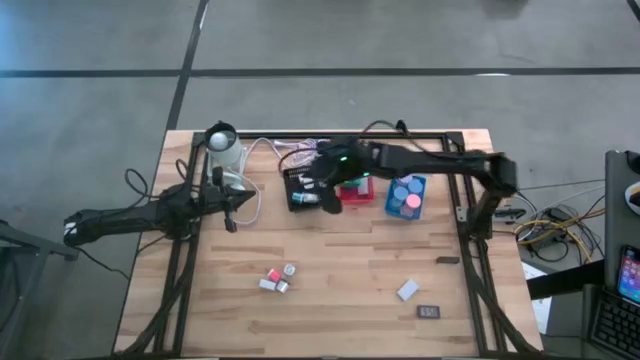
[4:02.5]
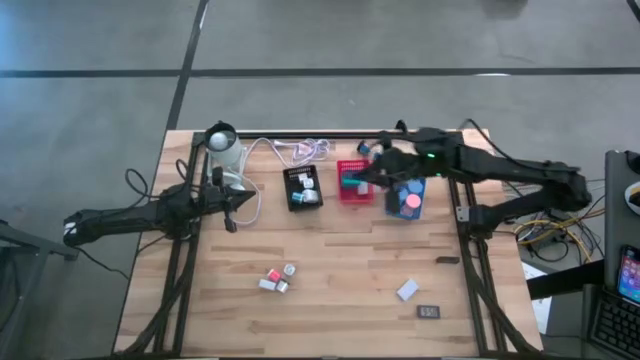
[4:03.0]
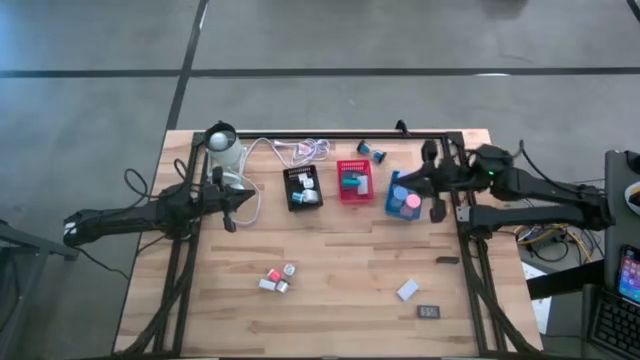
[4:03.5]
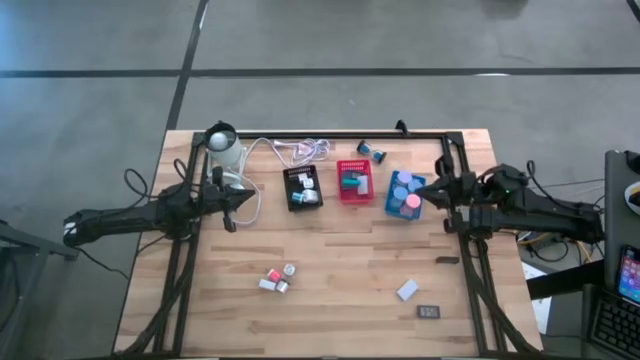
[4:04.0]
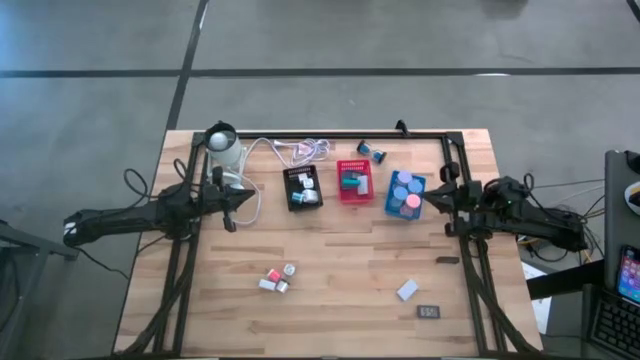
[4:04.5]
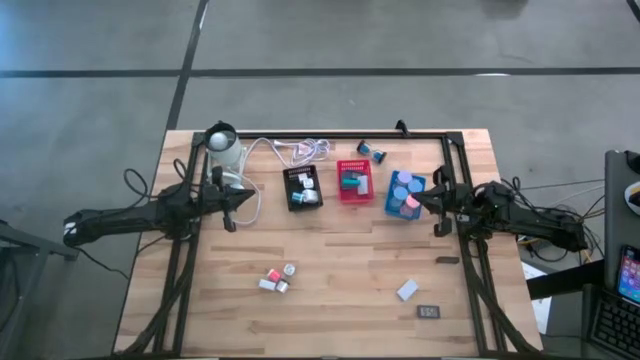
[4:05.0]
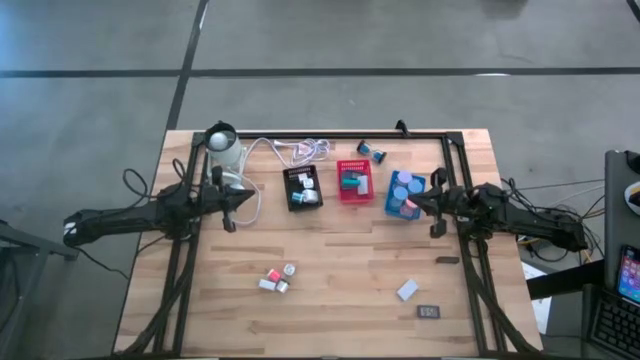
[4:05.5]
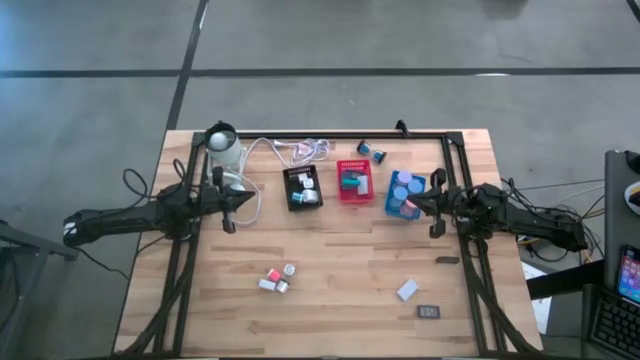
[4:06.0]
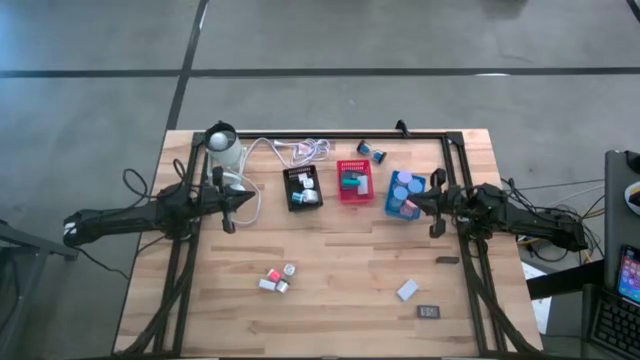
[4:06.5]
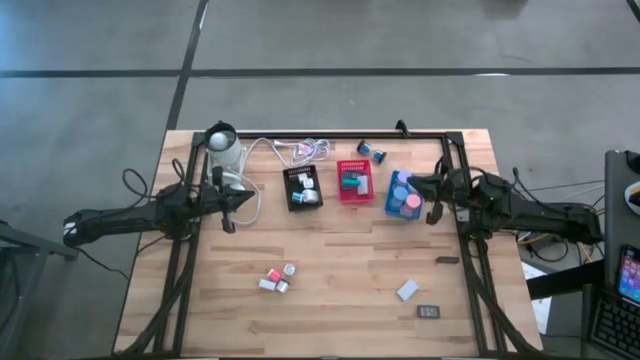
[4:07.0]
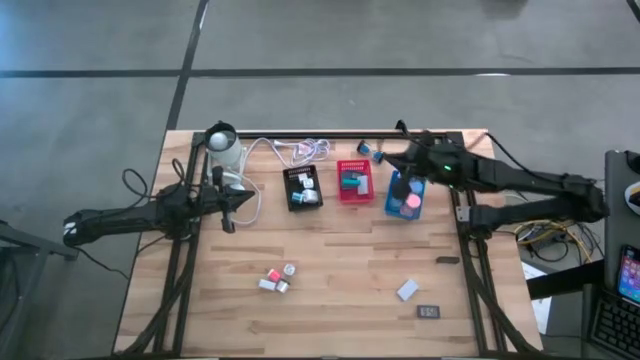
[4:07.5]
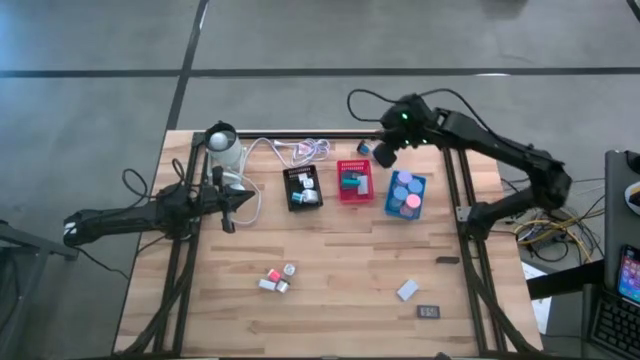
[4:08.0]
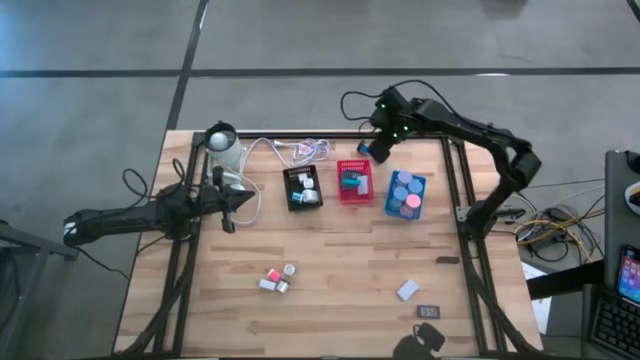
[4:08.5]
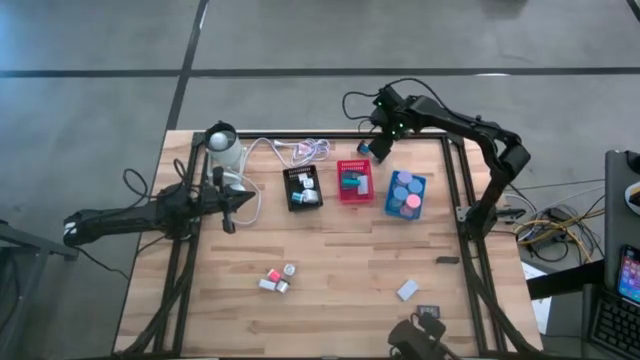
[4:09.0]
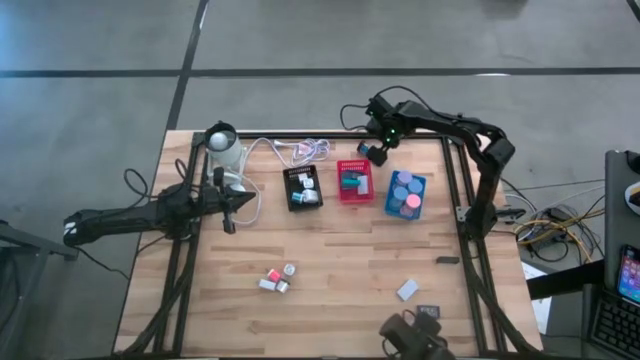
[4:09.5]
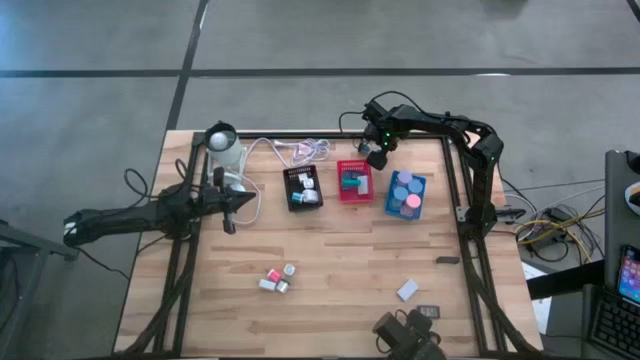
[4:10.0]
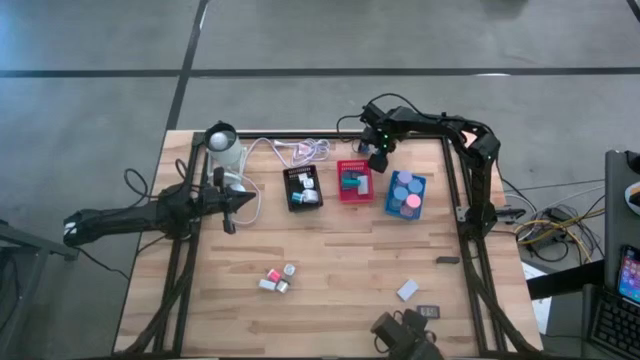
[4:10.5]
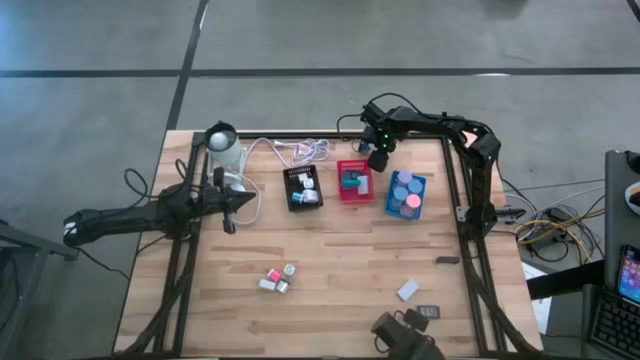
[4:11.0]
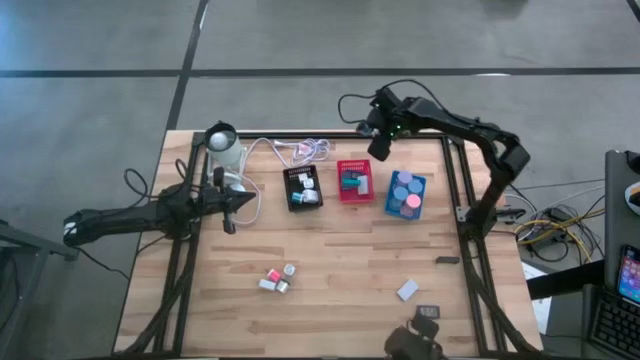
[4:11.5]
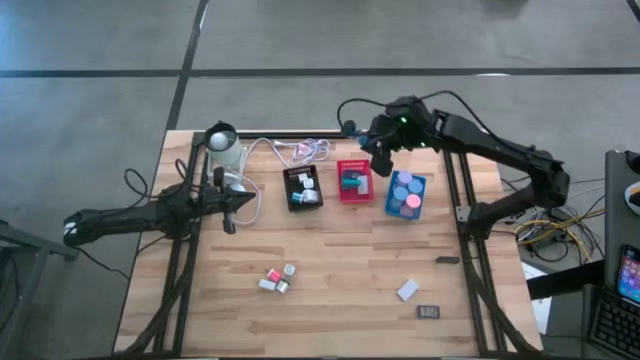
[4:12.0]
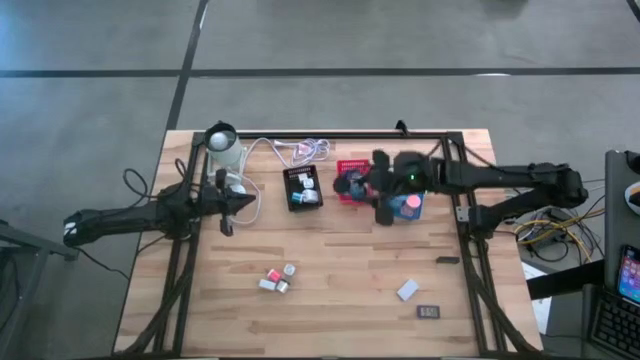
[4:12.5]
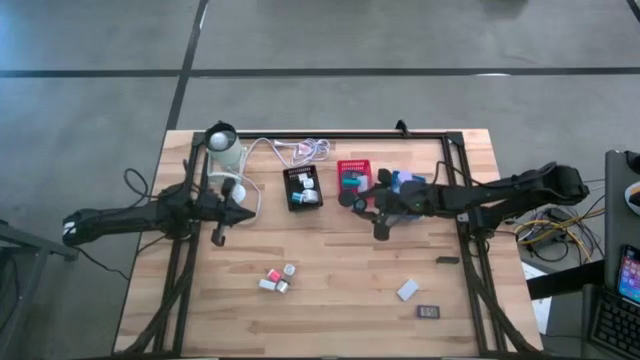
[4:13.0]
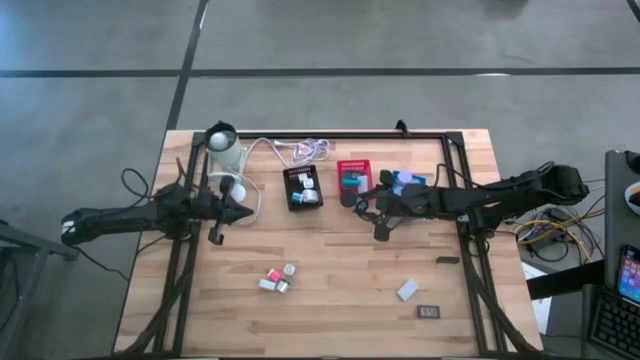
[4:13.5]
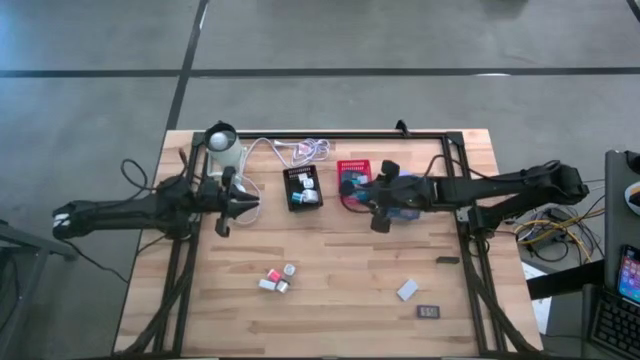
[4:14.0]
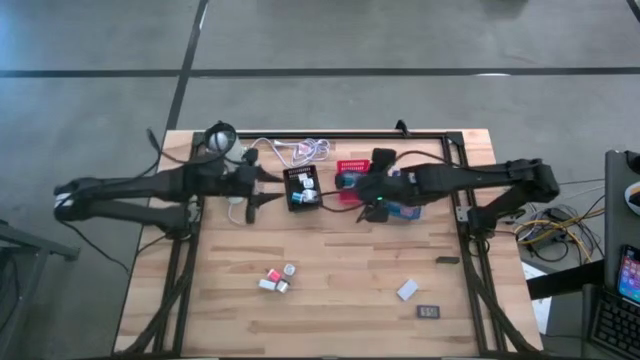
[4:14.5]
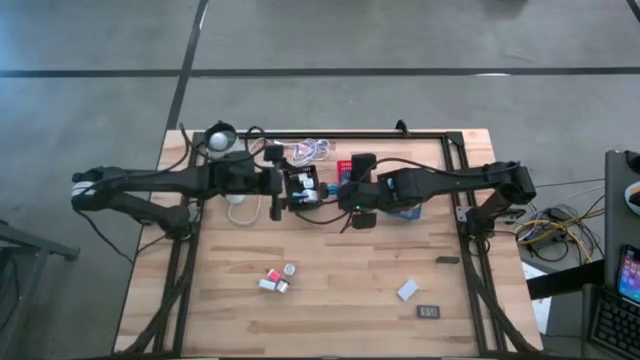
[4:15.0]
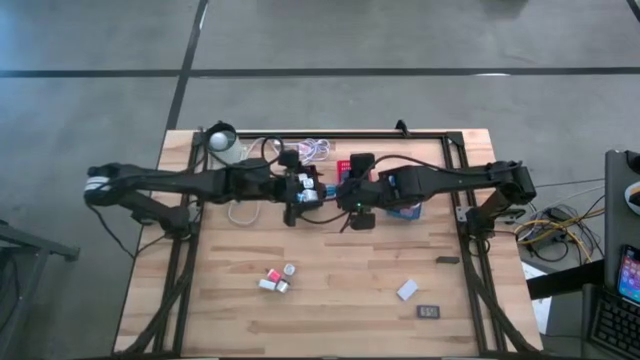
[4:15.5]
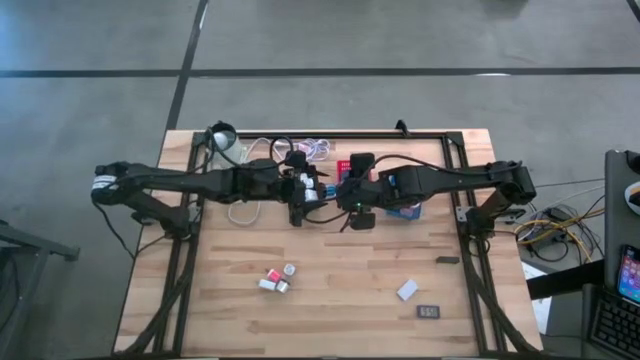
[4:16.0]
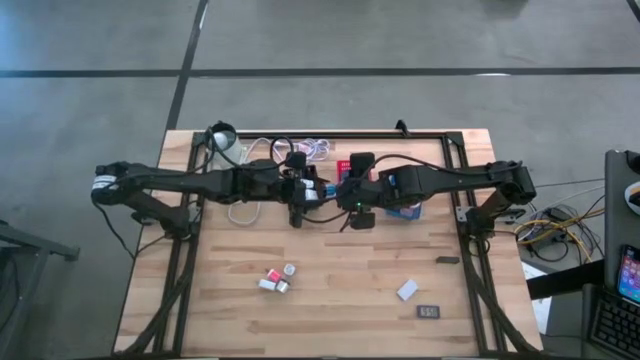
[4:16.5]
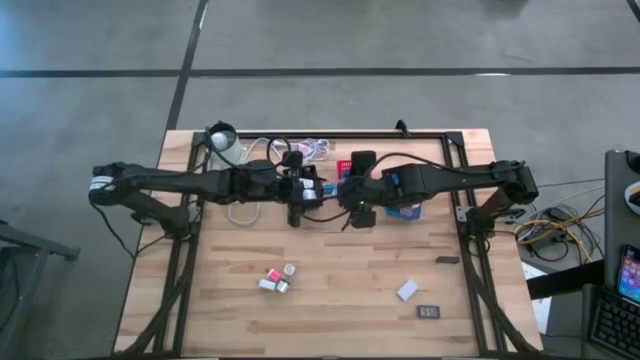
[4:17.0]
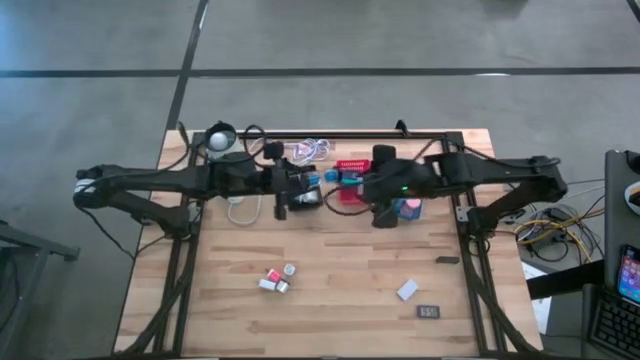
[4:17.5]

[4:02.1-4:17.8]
Task: Pick & Place Office items
Put the blue hourglass into the blue bin

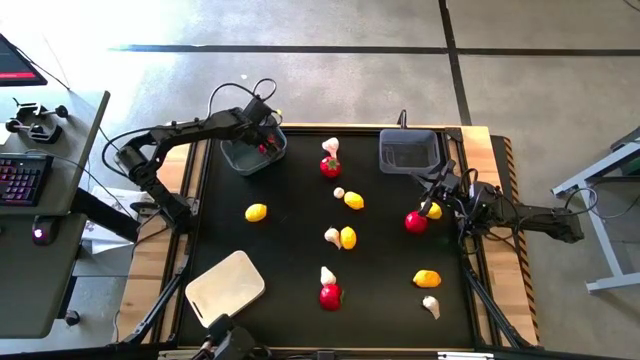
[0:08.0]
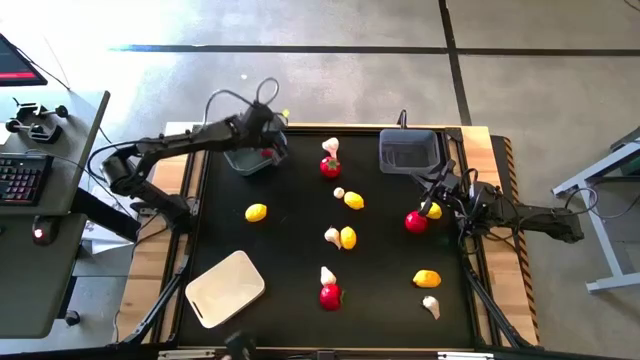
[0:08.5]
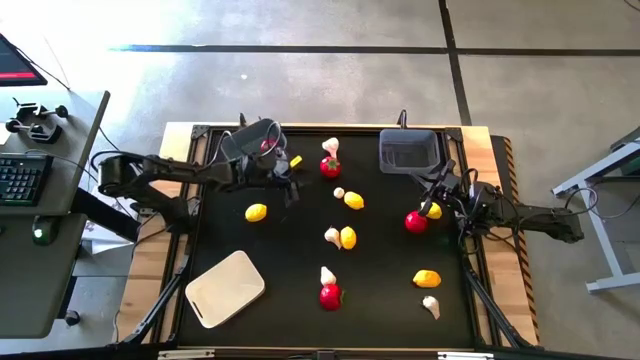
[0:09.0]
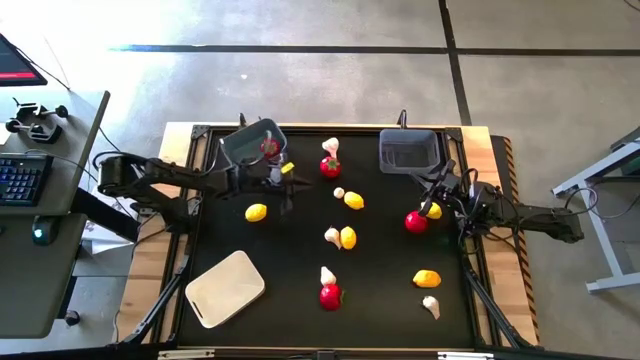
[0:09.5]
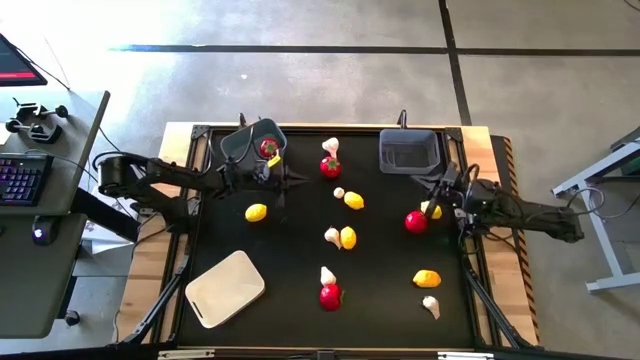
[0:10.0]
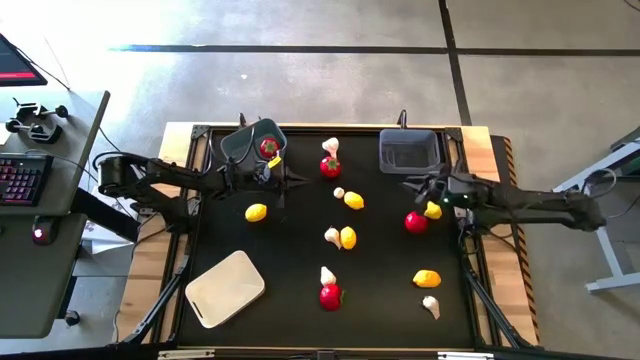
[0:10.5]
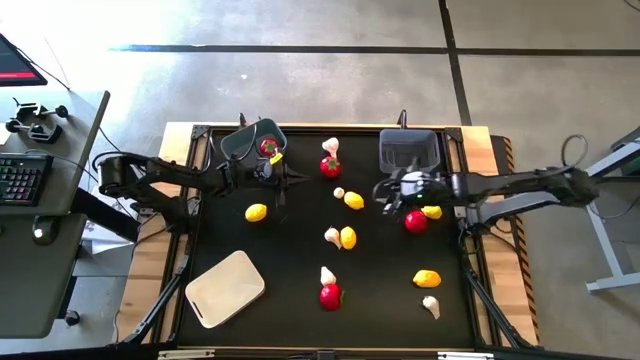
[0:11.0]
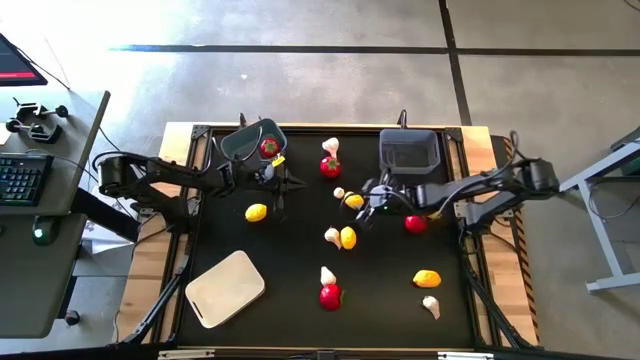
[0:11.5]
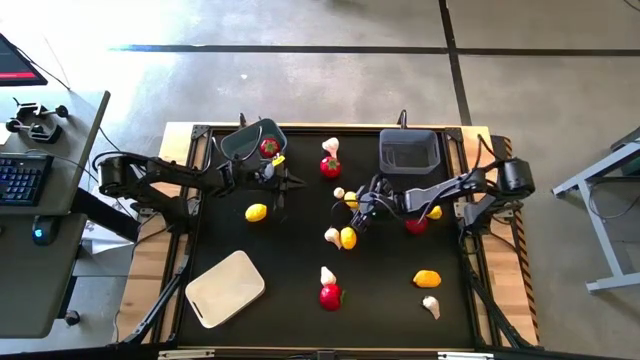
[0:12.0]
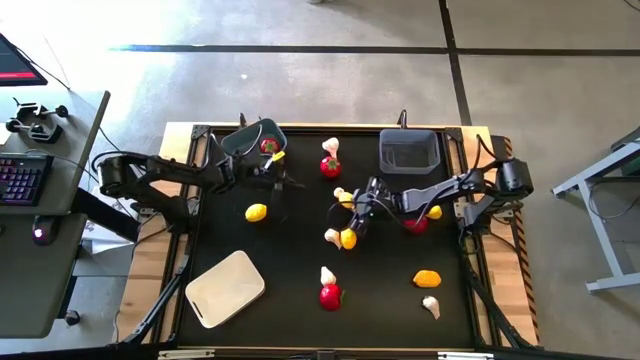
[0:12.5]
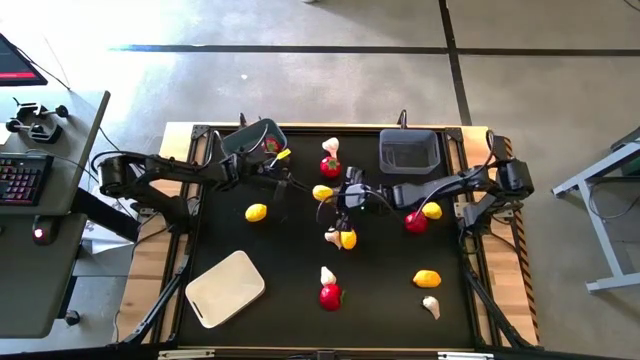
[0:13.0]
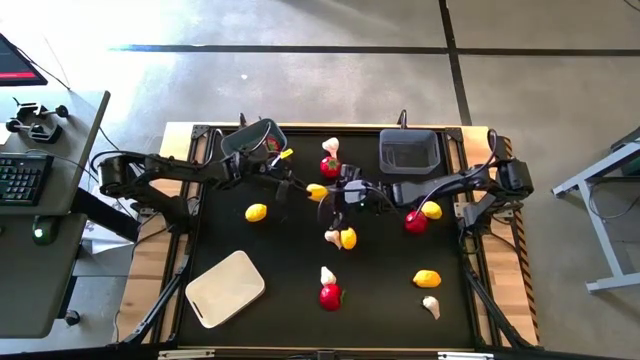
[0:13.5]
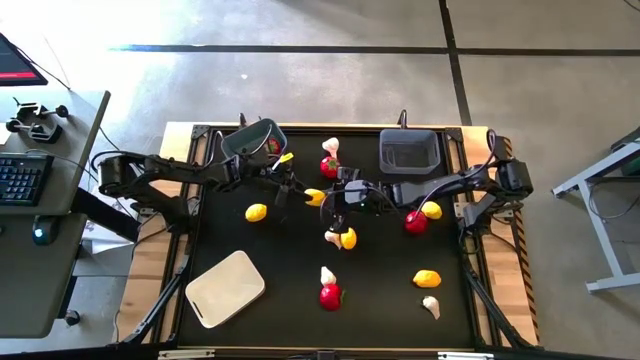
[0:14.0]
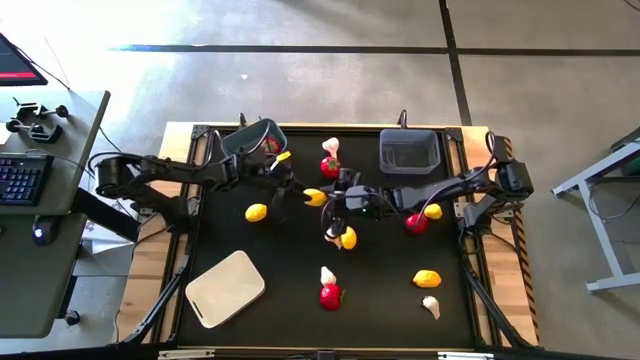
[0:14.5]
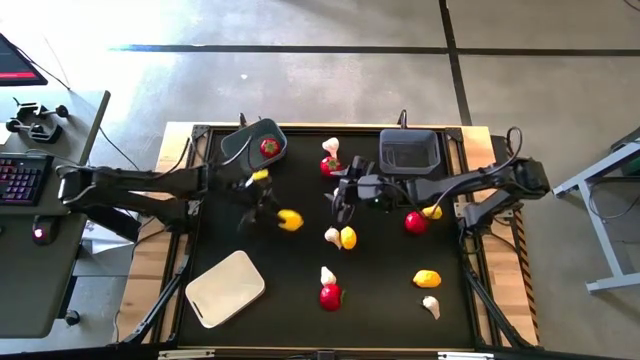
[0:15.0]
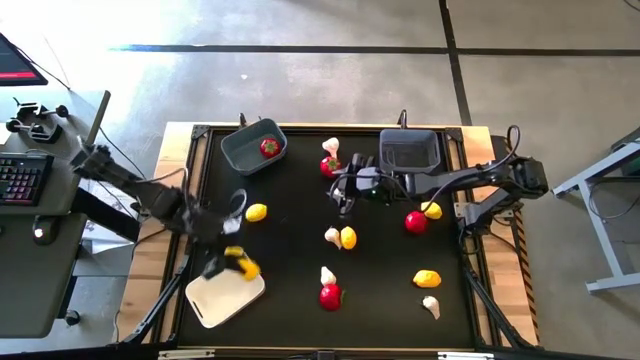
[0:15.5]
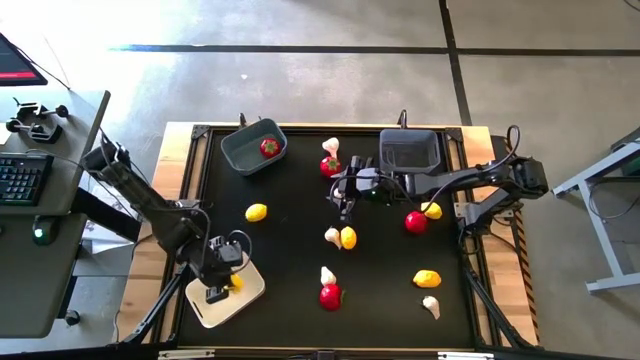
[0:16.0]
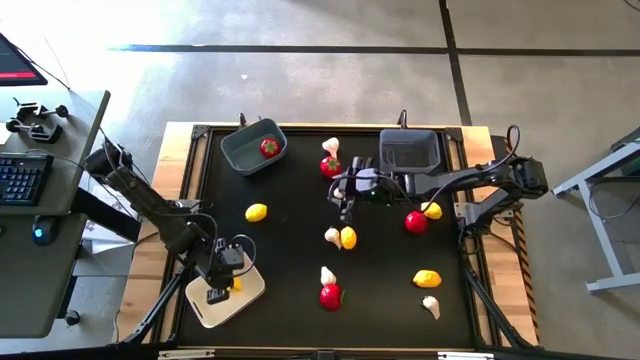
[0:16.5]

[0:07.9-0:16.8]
Task: Sort produce into baskets
Put the yellow lemon into the white bin
